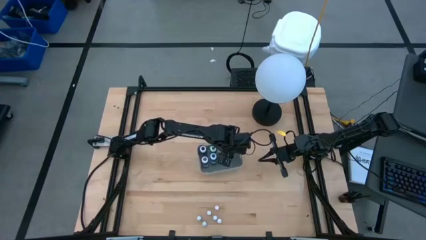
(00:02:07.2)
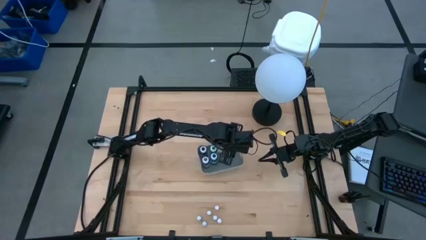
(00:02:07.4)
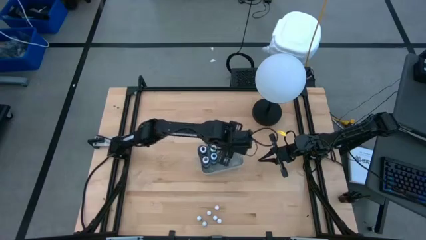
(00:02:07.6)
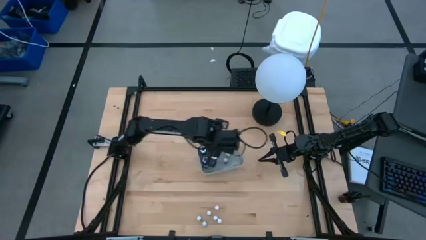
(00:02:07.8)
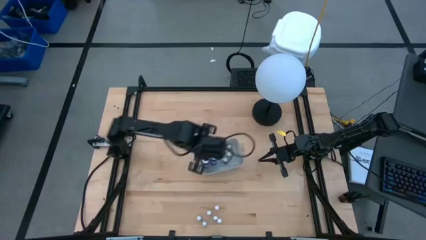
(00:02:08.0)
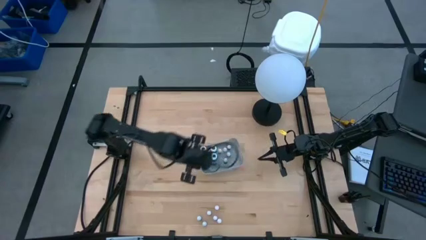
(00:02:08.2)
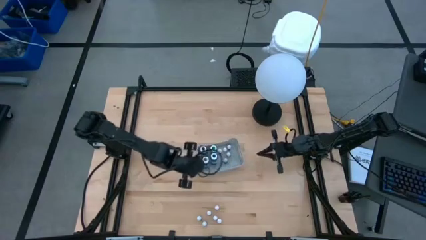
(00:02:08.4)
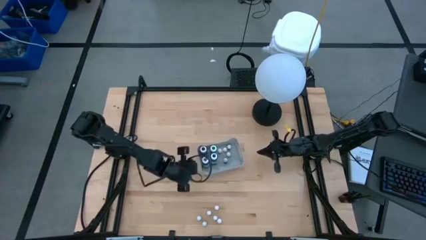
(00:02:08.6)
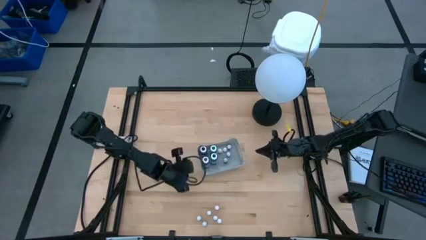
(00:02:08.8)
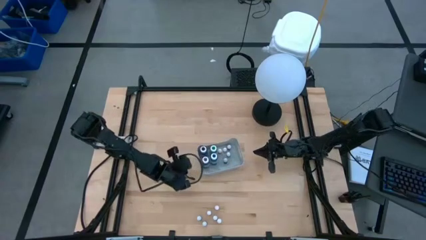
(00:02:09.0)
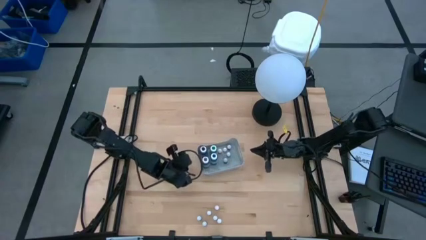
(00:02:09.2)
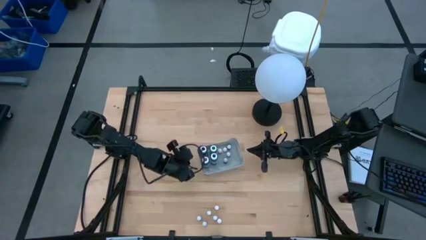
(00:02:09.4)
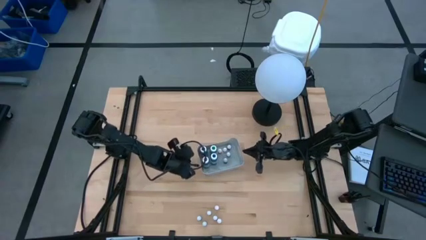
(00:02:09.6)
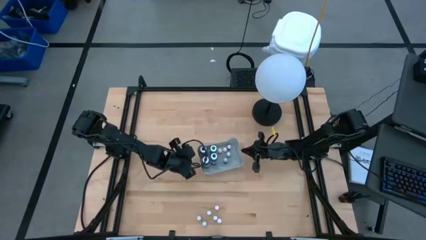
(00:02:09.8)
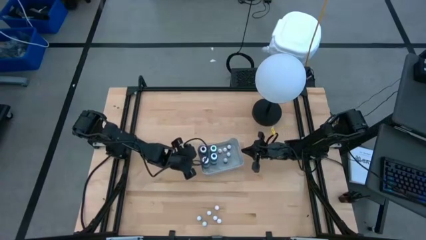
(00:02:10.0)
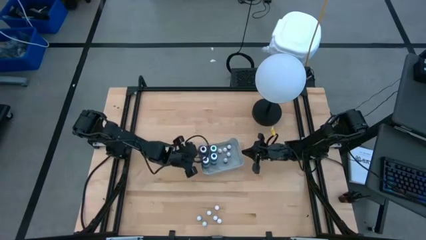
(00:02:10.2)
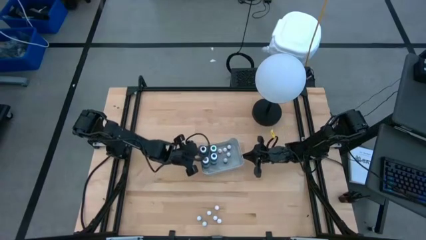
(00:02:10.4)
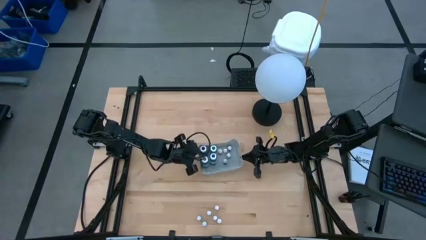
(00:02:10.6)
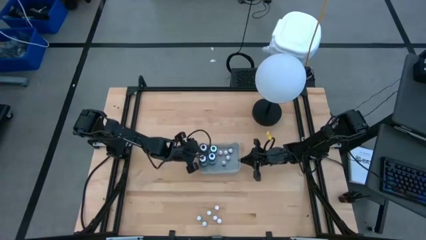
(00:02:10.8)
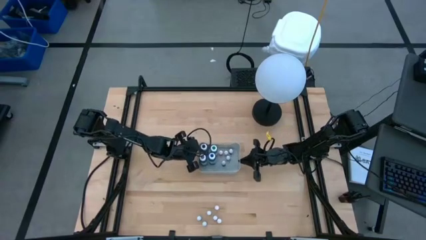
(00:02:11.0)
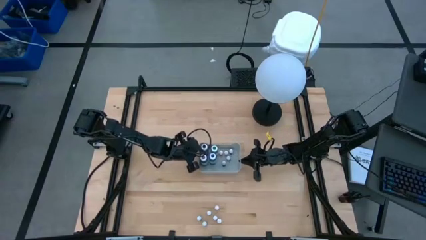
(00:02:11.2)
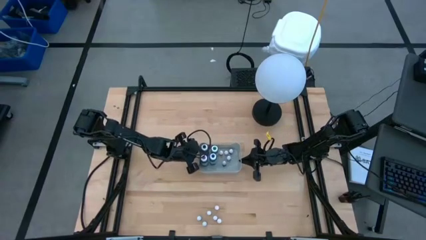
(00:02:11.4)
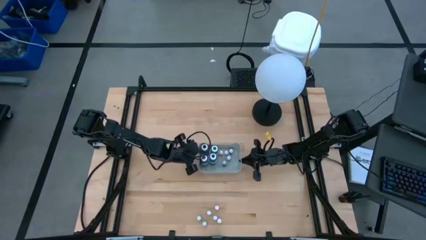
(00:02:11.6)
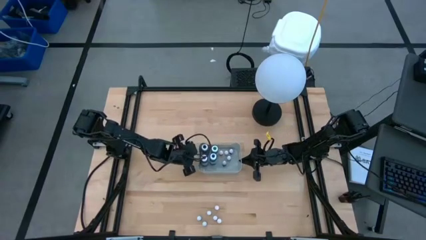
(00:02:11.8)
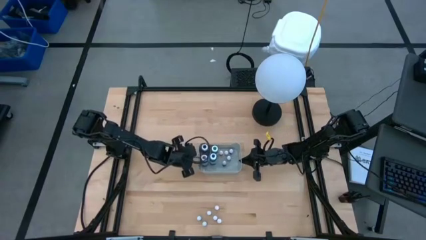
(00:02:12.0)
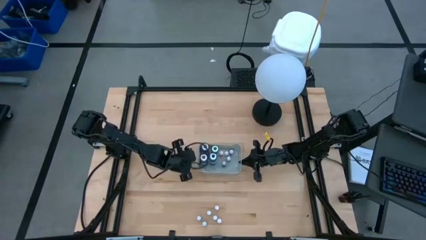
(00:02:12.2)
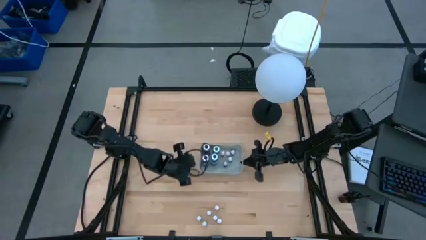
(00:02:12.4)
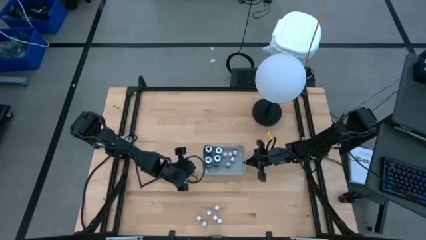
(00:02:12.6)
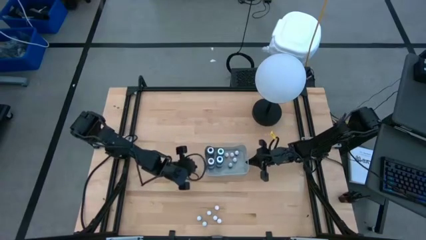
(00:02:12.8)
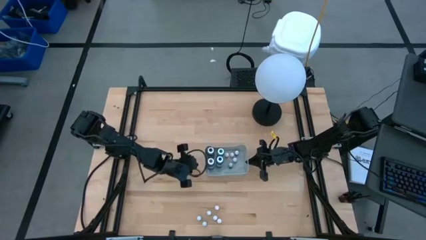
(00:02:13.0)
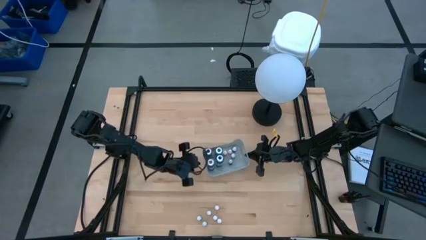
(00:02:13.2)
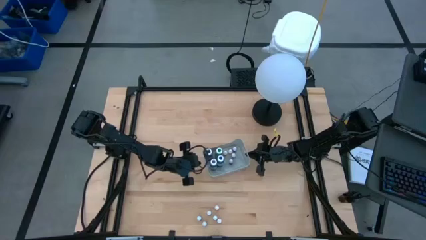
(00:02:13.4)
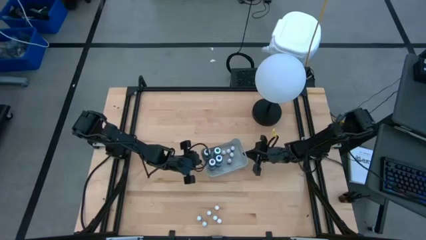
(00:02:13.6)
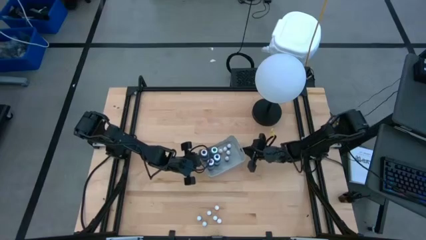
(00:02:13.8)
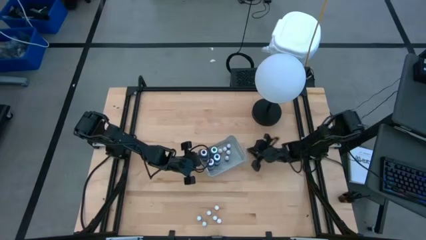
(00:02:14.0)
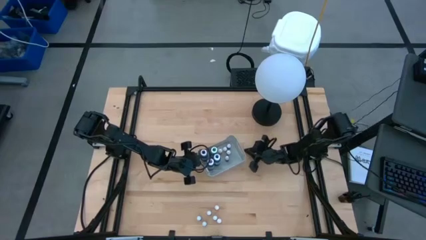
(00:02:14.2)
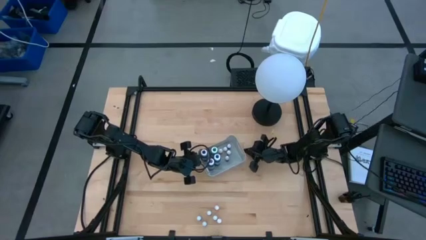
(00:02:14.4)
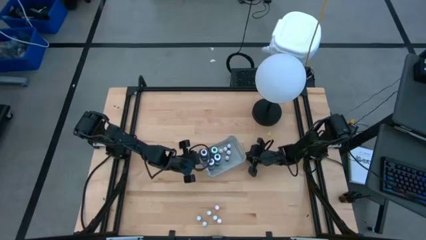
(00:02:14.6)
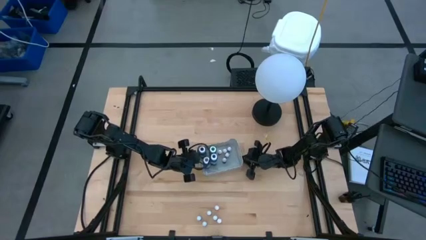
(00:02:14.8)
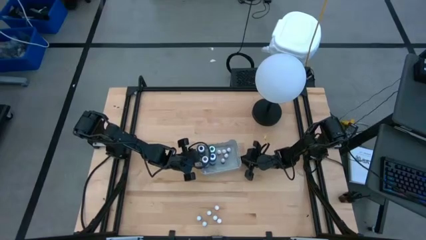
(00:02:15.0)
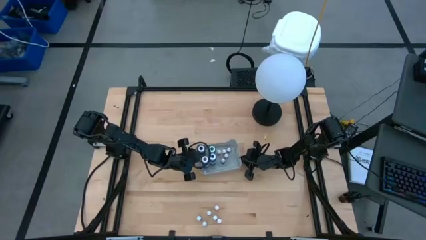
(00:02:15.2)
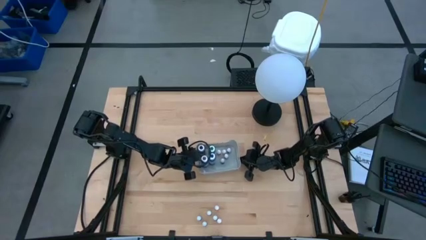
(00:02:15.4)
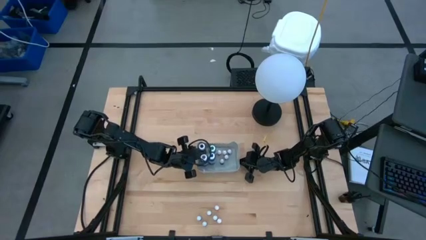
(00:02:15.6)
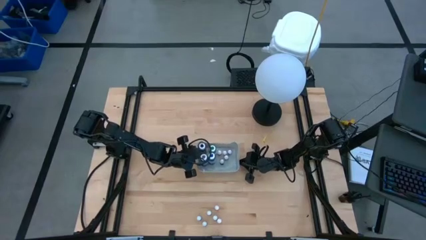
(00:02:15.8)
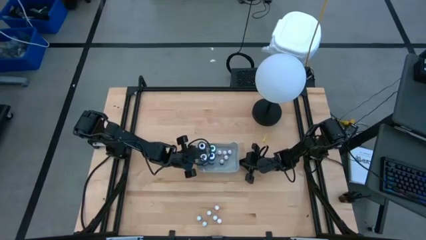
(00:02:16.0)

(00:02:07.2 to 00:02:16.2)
Task: Pick & Place food coloring
Adjust the gray bin to the center of the table

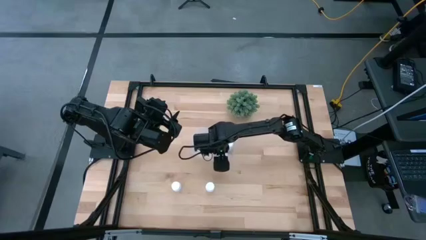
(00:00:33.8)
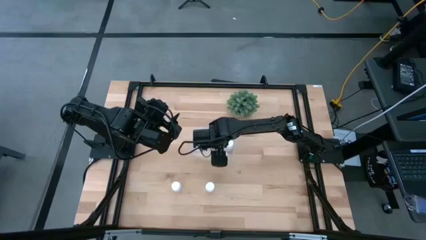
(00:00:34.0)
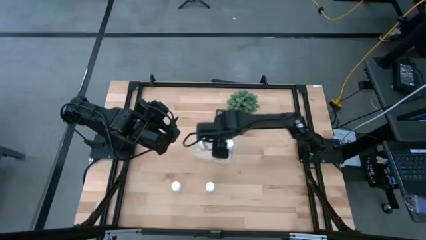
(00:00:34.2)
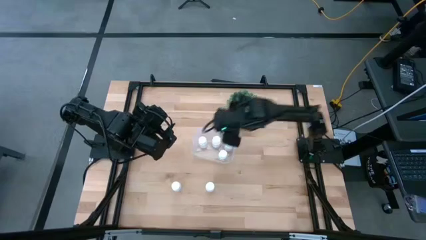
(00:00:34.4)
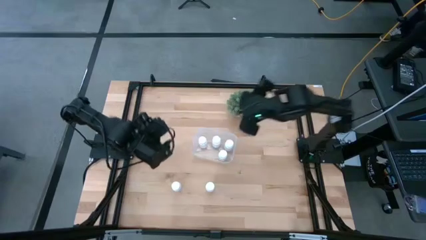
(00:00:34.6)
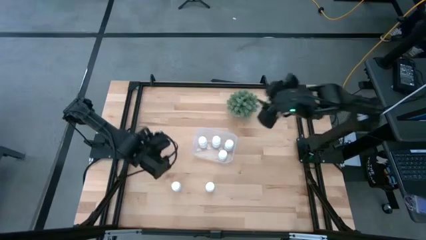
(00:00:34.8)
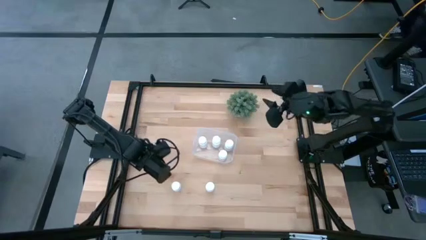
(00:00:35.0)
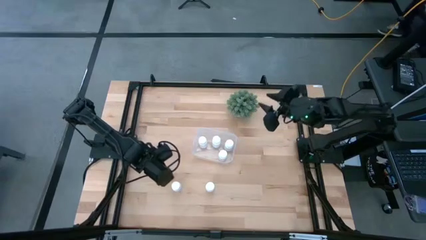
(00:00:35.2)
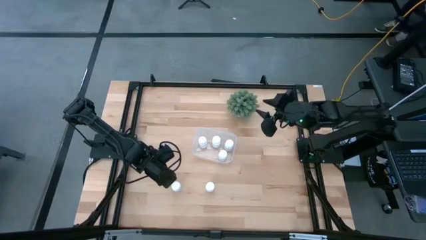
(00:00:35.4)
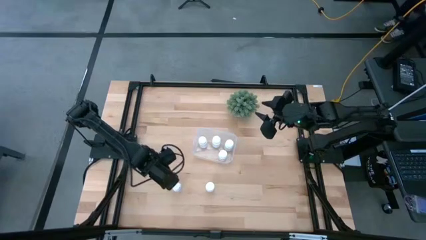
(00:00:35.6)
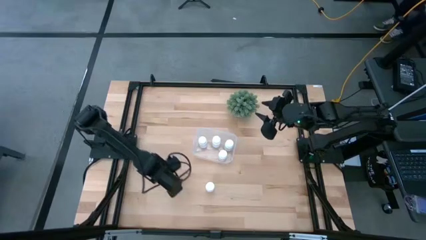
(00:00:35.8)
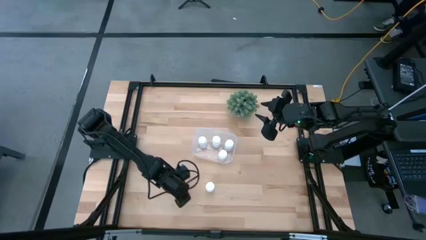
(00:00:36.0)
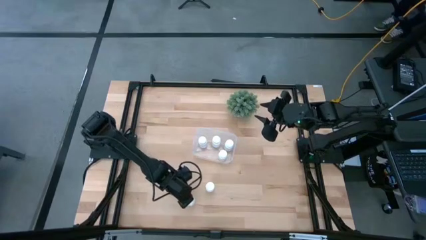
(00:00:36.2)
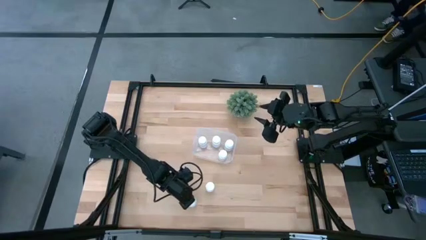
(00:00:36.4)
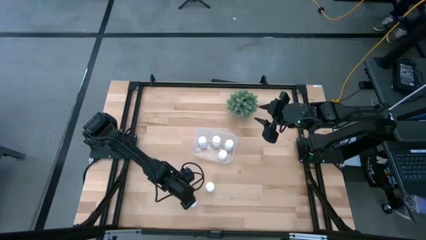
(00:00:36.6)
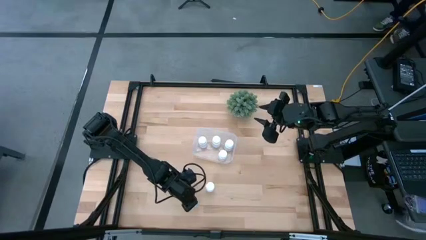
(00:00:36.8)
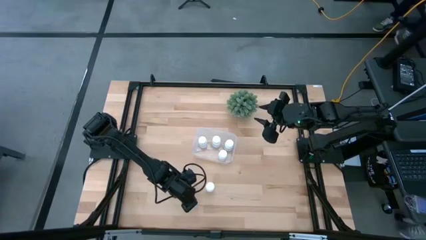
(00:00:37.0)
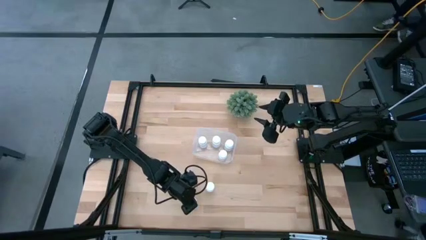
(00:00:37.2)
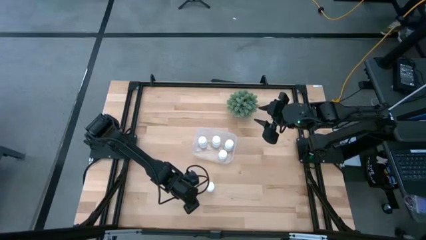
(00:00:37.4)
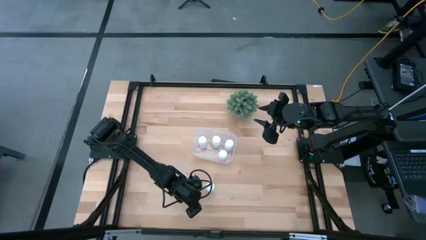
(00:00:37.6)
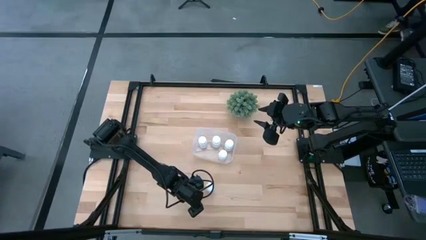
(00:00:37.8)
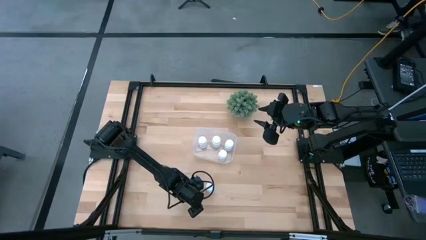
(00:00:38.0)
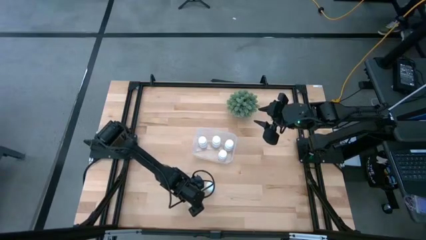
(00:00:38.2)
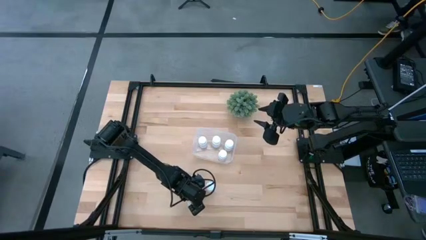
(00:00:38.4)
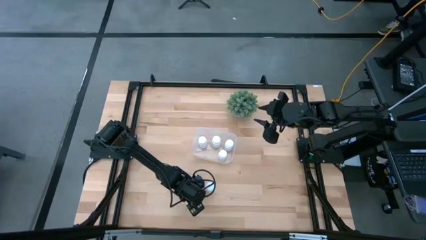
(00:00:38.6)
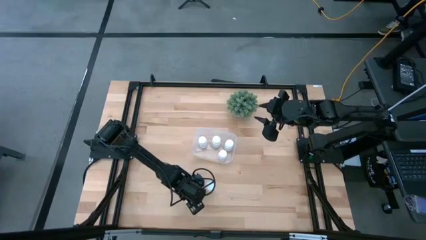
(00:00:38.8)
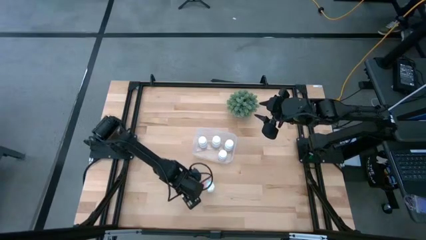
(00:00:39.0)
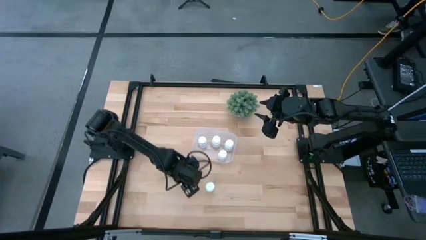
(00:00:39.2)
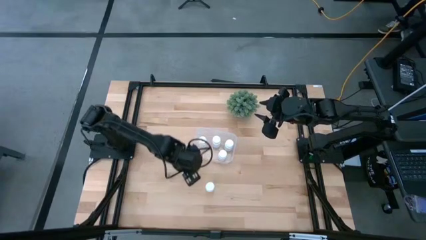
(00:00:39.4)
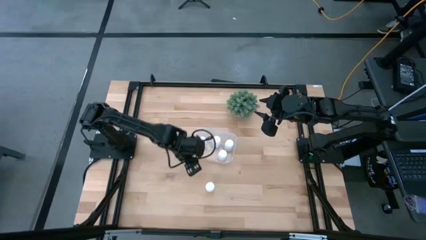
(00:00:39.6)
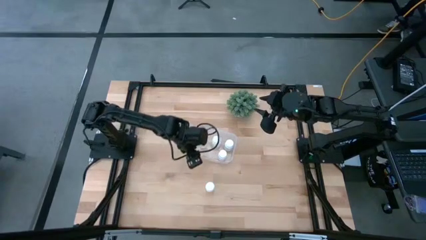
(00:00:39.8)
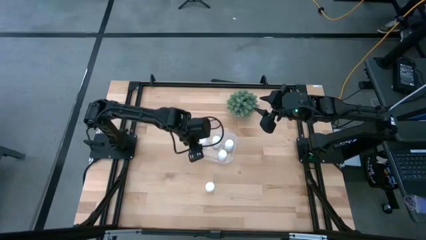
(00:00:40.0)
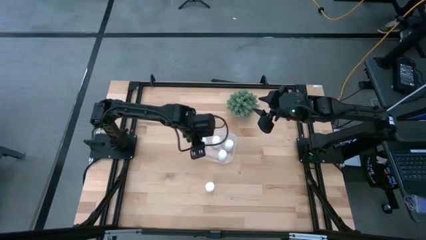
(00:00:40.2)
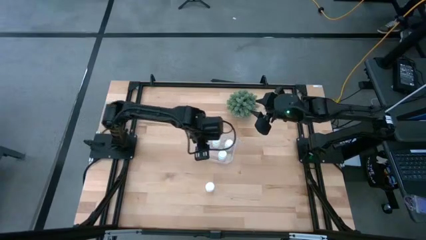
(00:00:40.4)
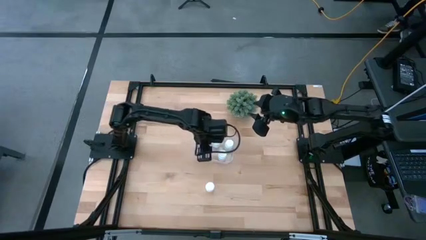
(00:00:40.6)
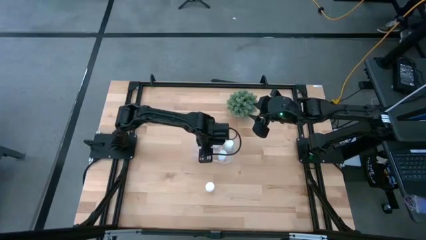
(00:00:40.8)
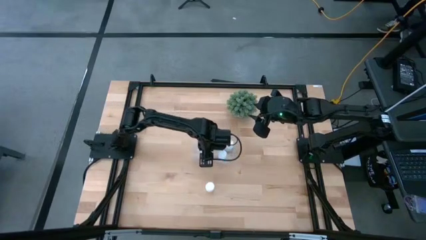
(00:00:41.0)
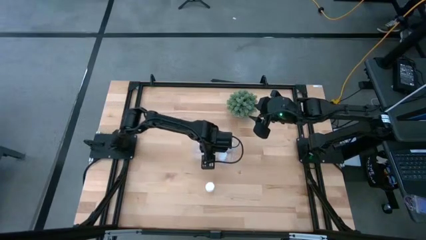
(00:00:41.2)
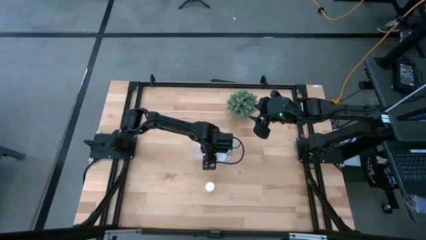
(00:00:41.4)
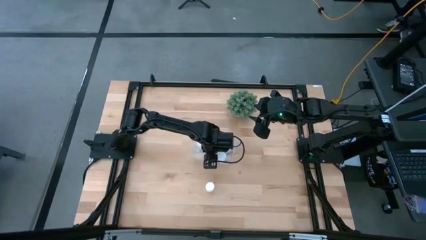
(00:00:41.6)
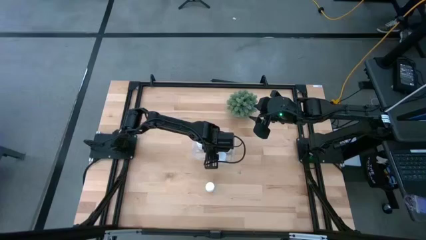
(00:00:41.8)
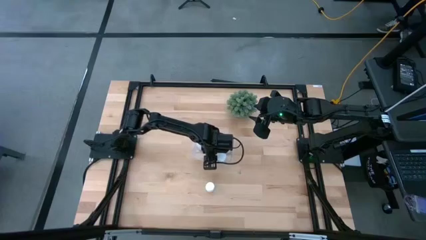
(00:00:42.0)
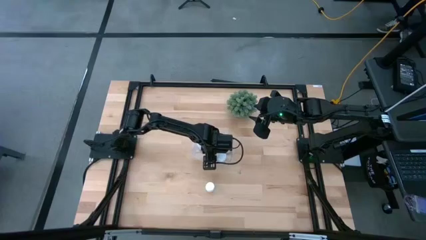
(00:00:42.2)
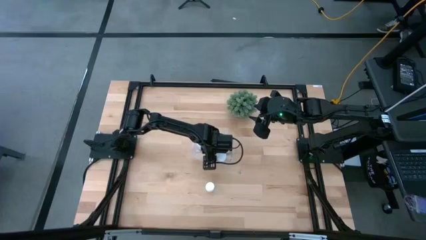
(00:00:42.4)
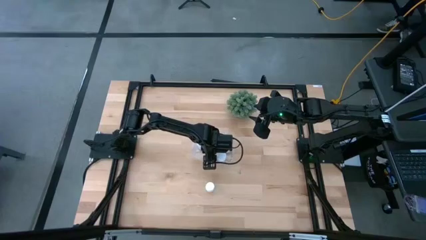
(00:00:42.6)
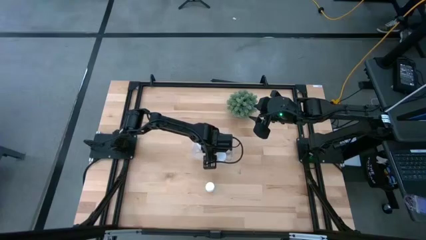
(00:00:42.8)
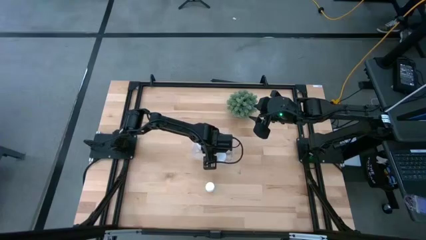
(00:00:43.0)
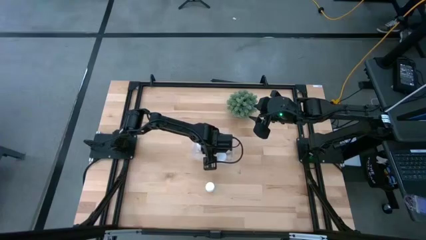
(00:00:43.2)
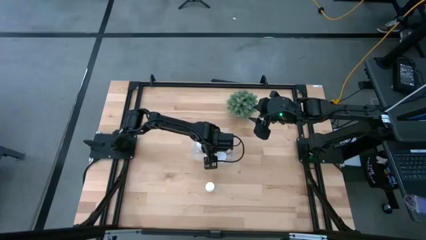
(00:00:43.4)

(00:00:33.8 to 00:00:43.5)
Task: Pick and place pill bottles into a basket
Put the left white pill bottle into the transparent bin
